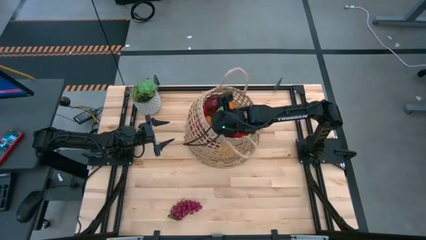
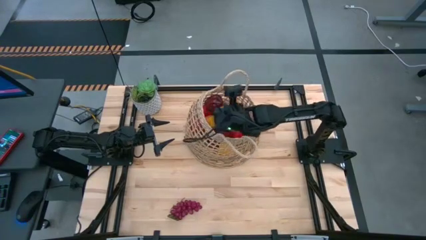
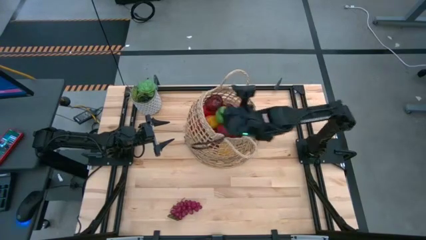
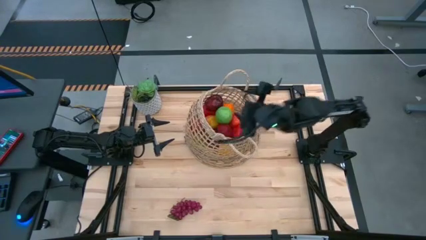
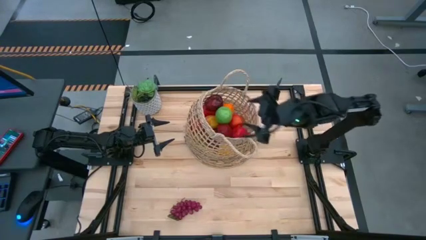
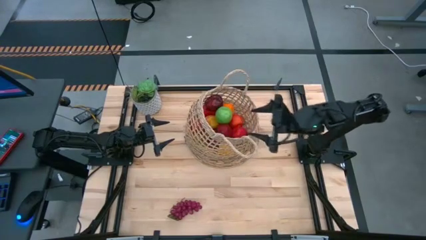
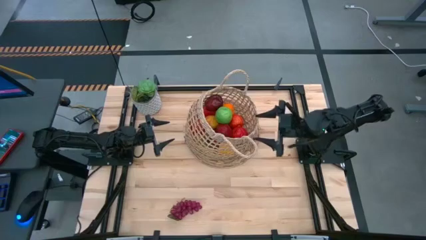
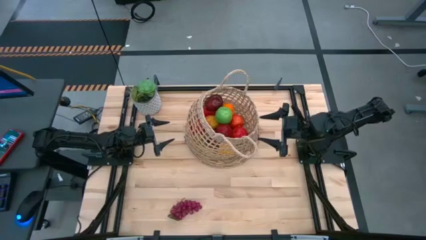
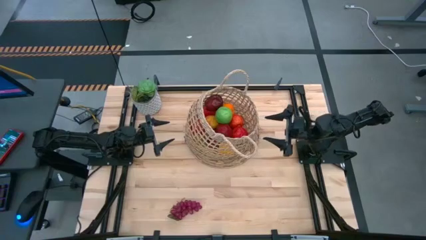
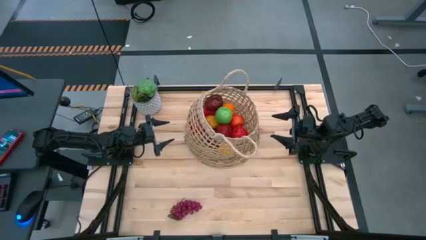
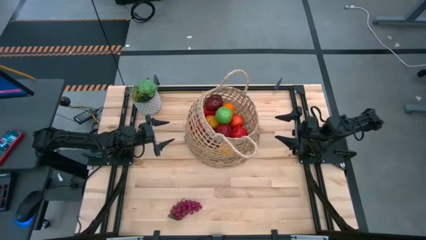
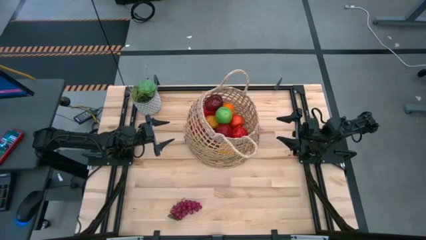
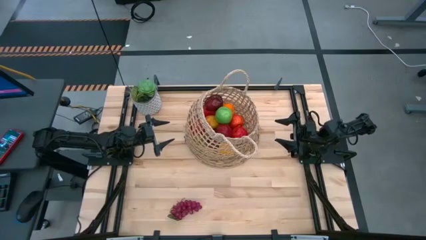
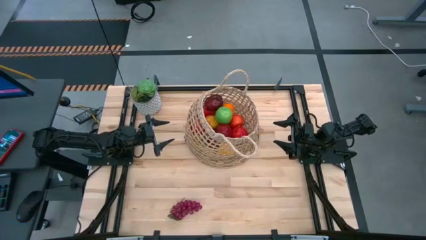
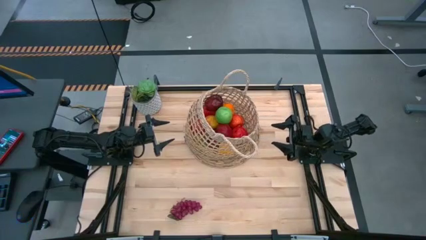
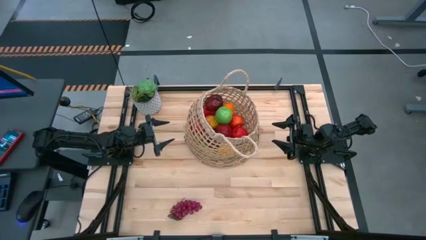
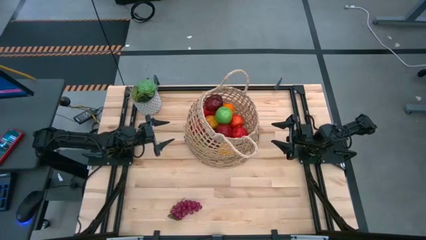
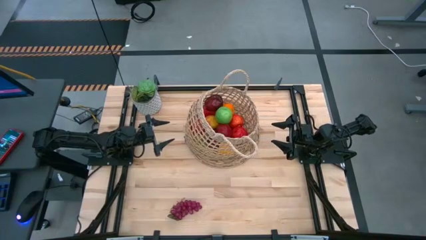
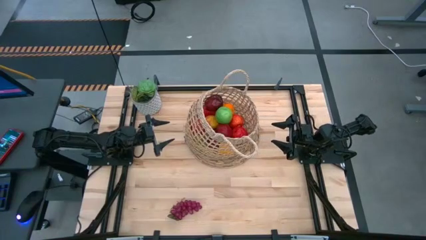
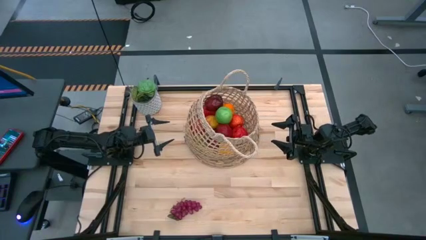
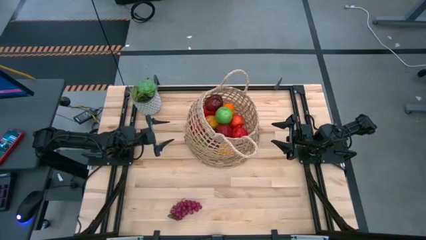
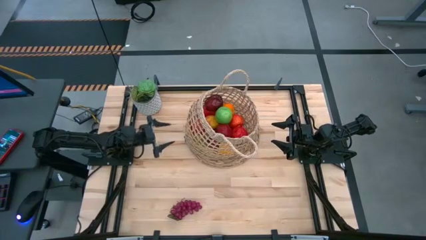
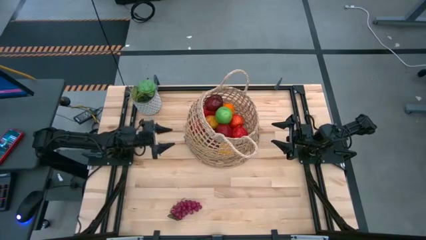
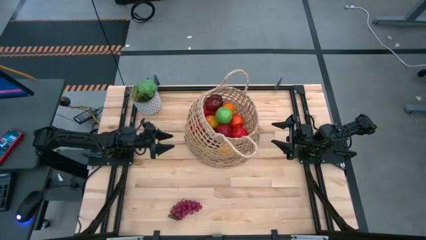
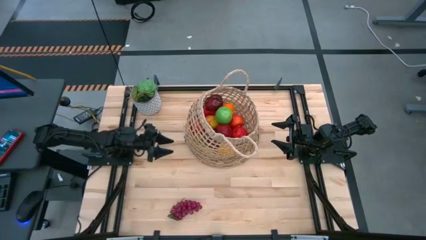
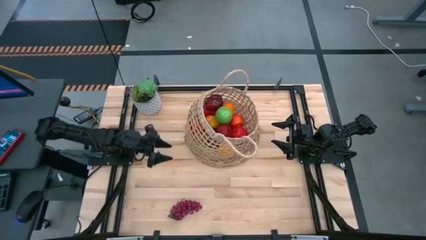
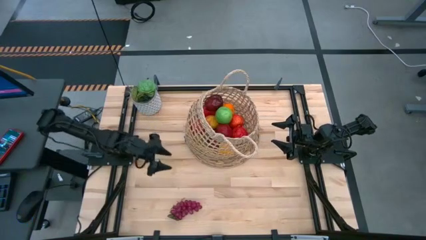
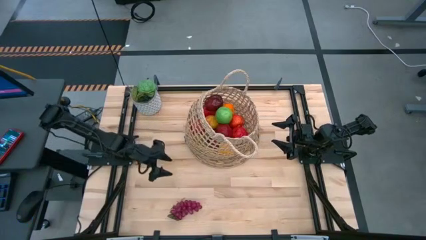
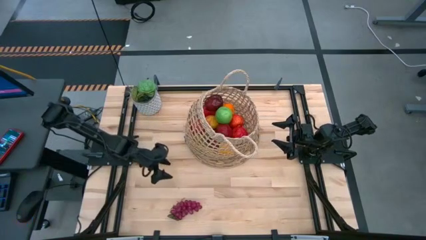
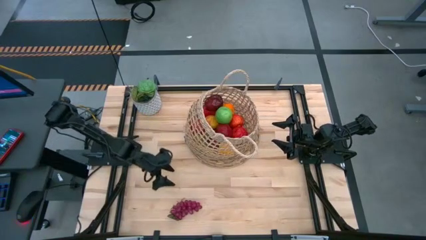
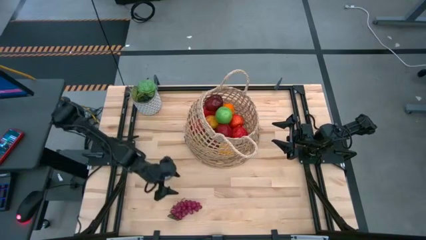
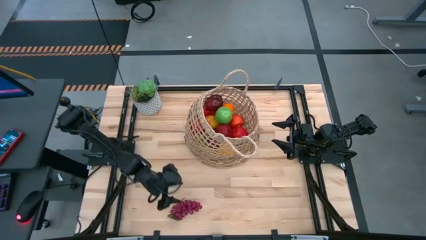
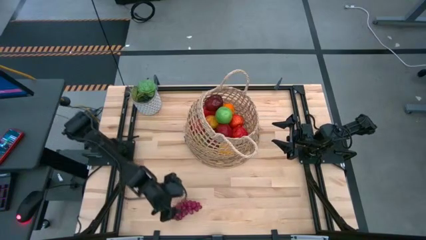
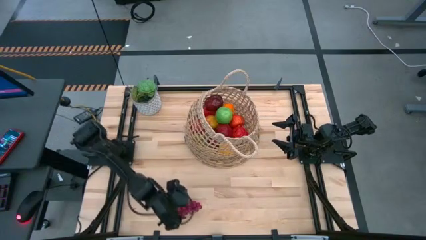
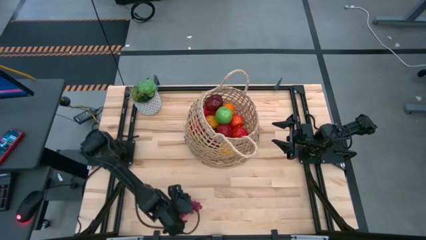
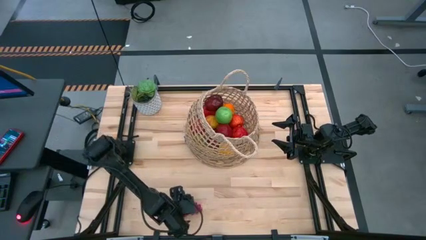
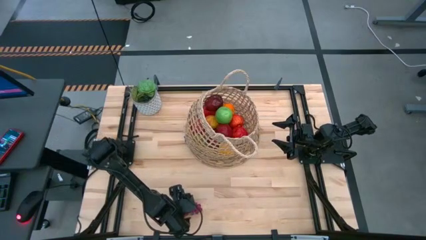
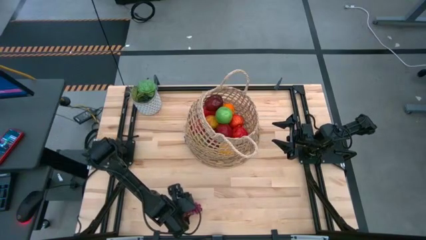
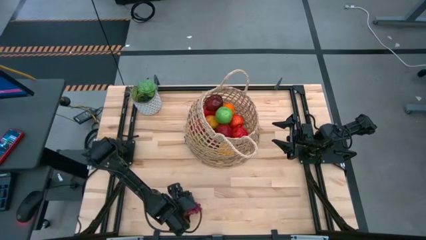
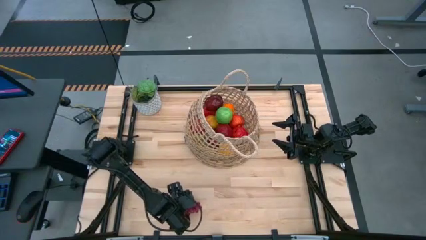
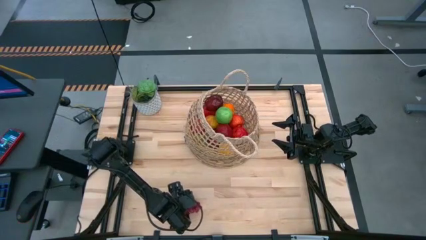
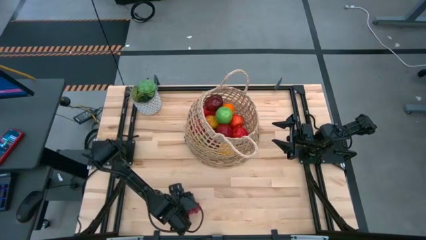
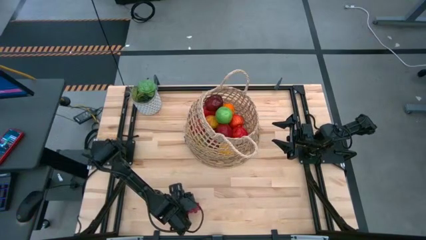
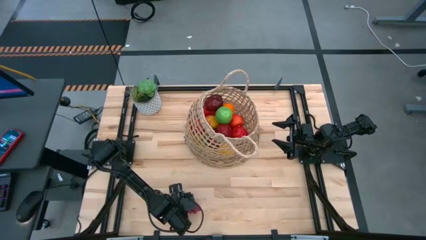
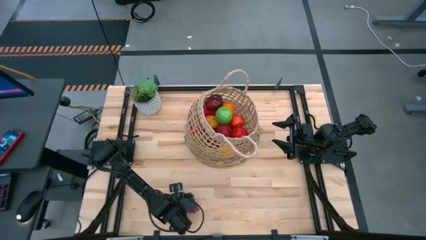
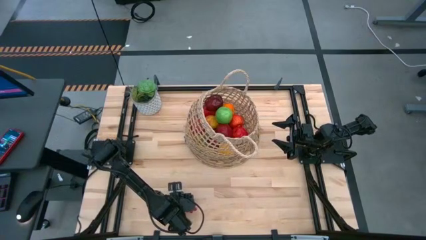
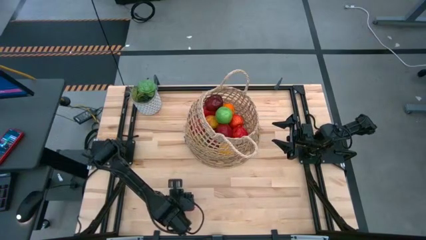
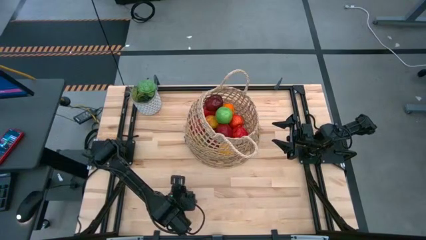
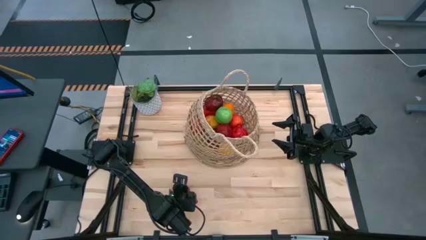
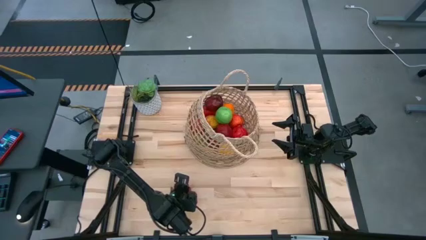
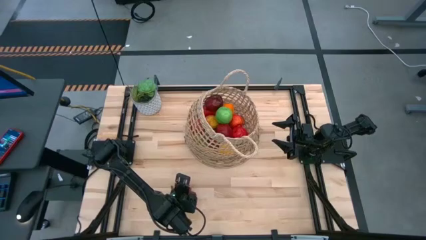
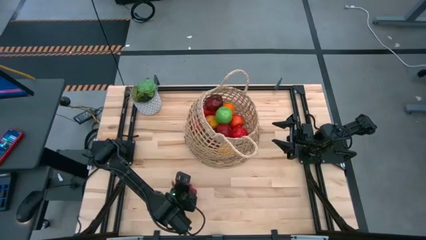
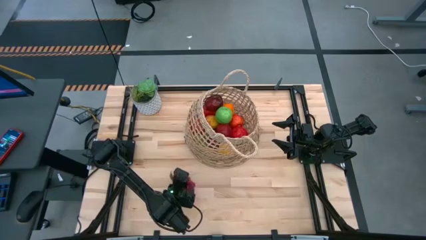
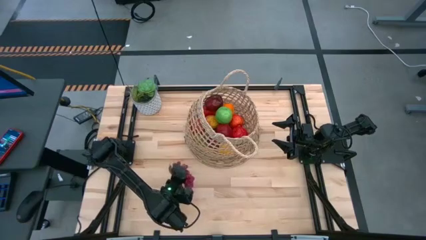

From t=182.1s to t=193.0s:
Task: Build produce basket
Put the red grapes into the brown basket
